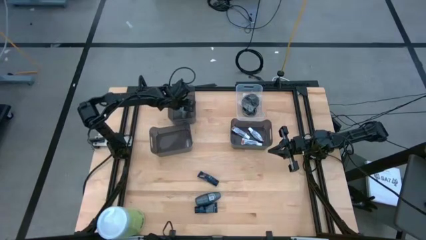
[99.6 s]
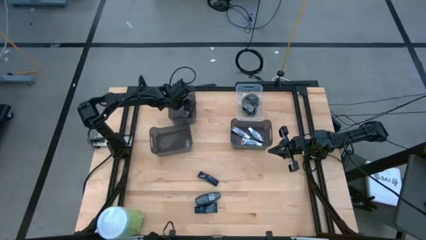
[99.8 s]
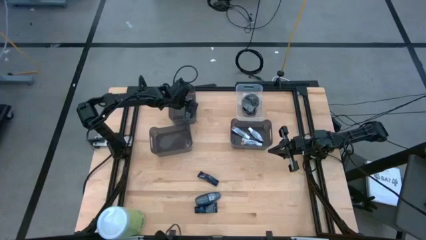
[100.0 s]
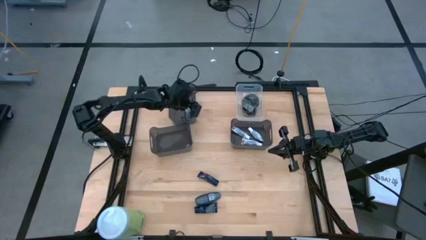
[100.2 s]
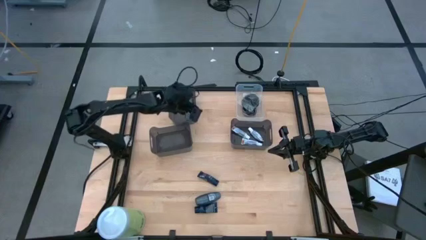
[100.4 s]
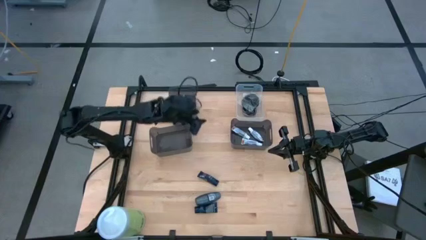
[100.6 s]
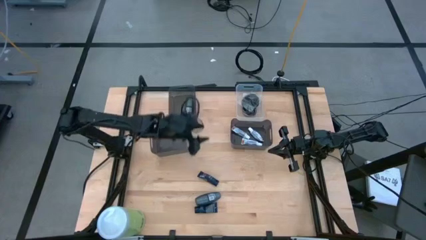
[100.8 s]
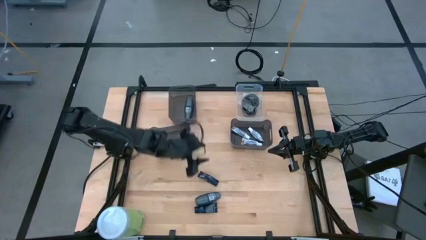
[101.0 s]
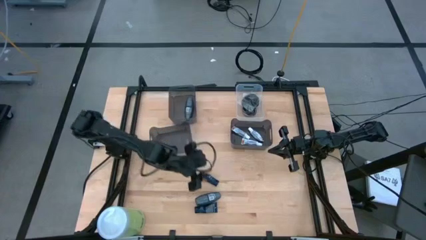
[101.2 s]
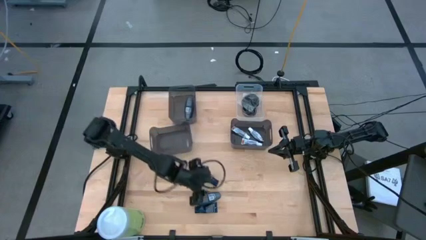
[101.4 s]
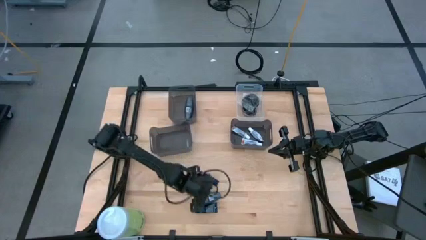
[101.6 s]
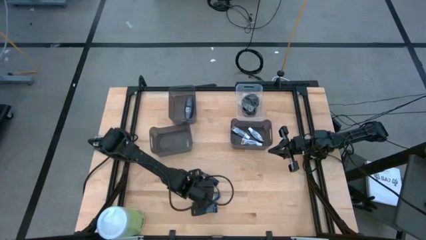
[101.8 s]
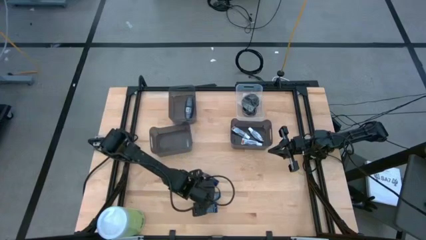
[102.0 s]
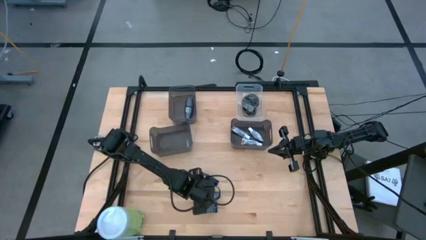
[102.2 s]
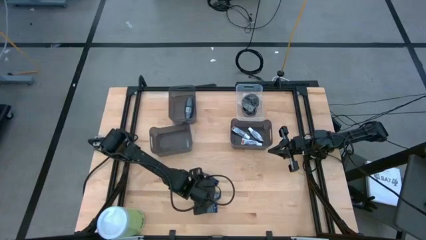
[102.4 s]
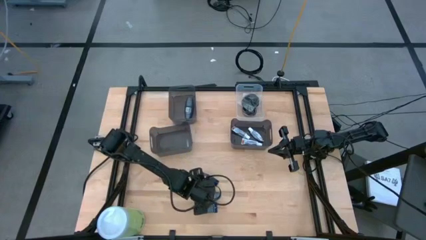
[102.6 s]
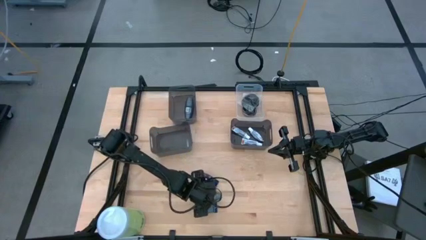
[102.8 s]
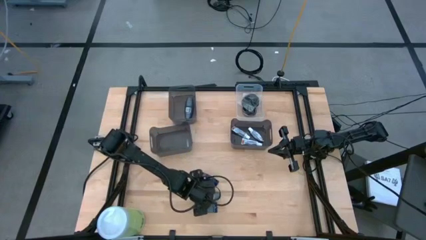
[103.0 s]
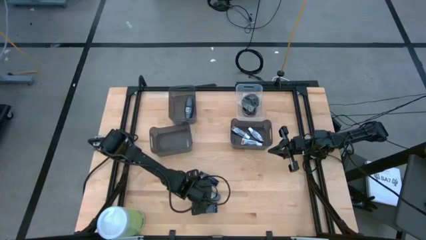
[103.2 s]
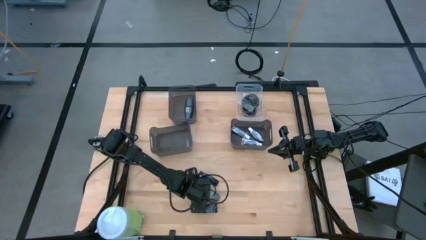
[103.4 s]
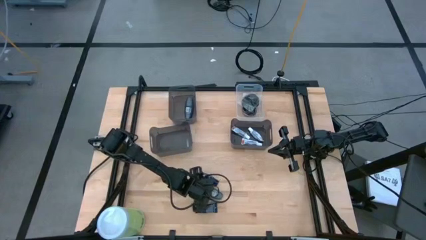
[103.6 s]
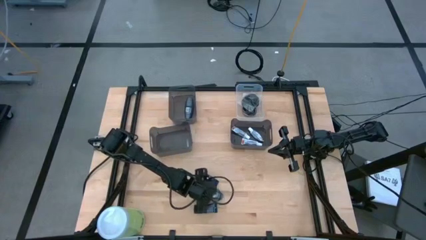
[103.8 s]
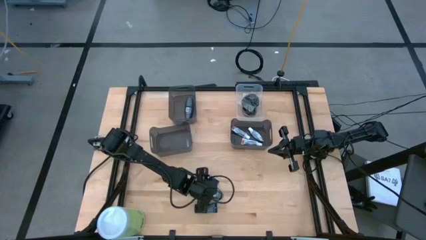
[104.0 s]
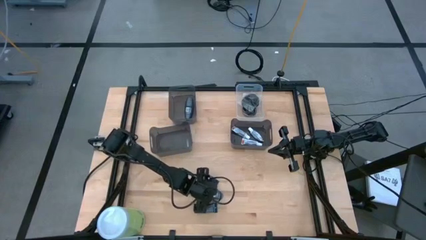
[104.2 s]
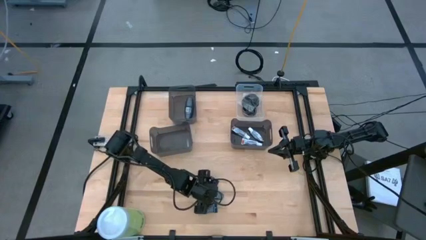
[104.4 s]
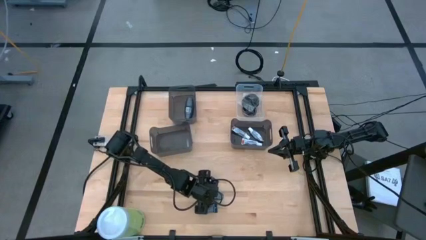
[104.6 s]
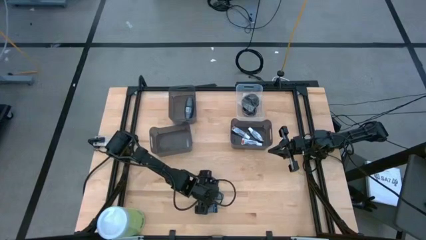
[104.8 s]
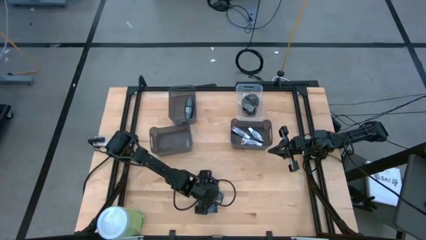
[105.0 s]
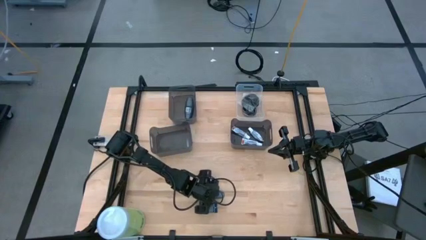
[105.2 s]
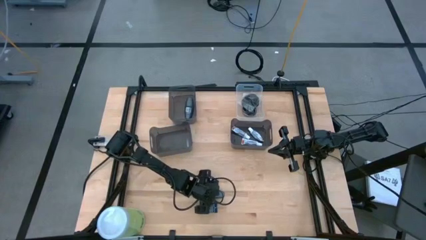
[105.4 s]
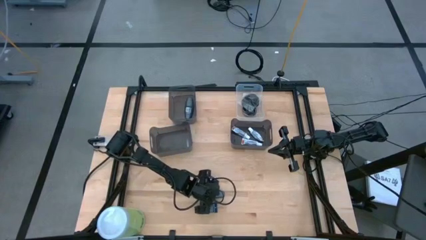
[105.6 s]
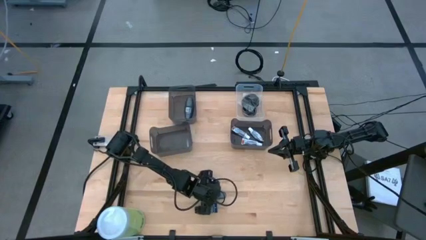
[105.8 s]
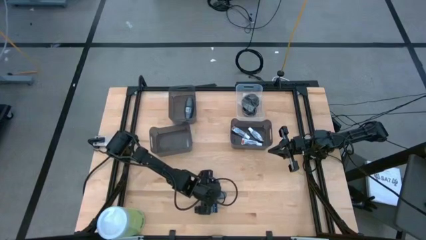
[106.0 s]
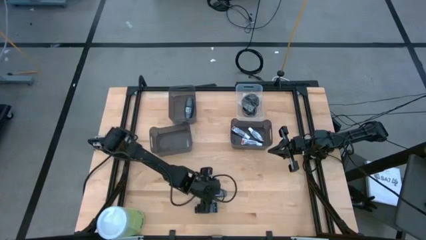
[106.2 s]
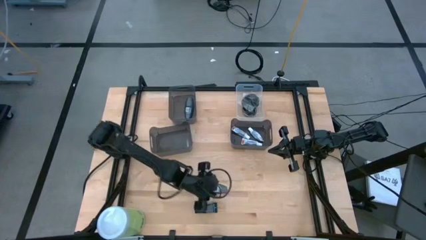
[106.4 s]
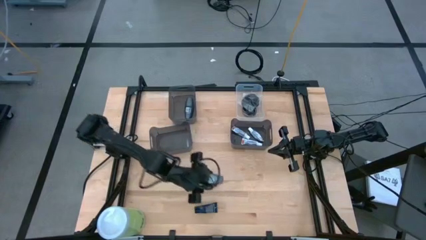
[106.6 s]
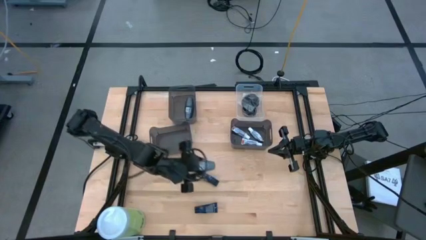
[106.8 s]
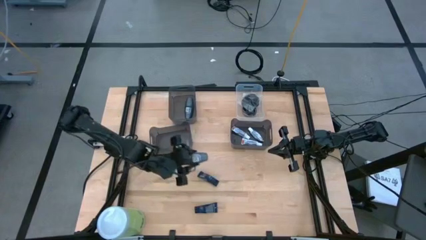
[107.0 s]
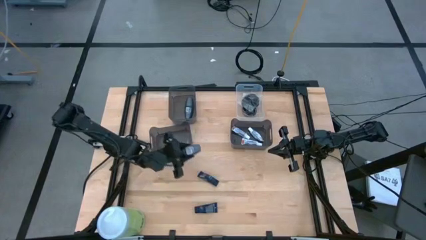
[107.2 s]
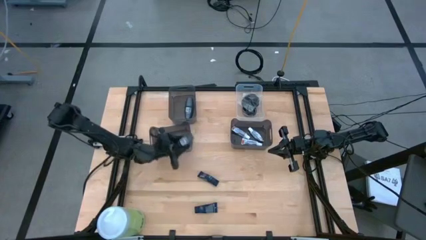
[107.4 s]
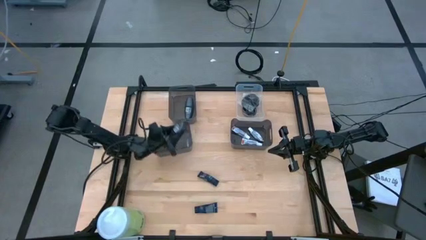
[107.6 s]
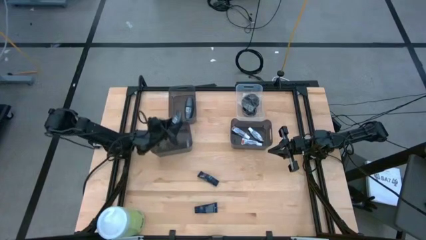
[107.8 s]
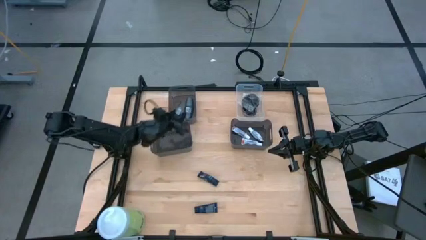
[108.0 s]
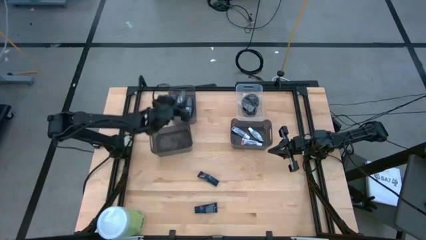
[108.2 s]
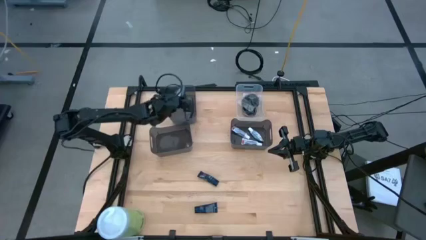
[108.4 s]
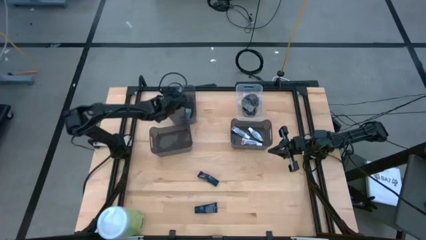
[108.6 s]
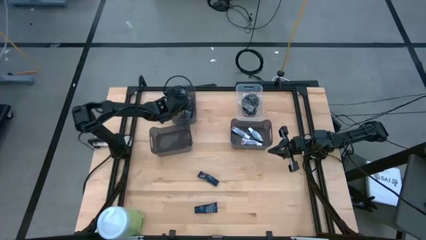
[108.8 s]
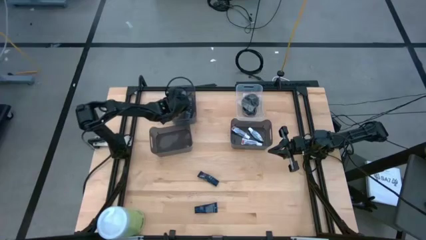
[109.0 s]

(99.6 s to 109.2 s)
Task: Pick & Place Travel size toiletries
Put the gray deodorant into the top black bin

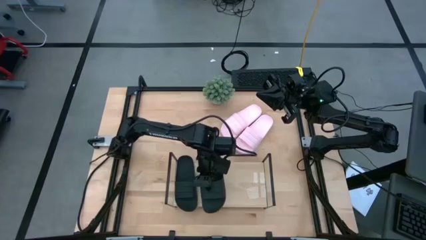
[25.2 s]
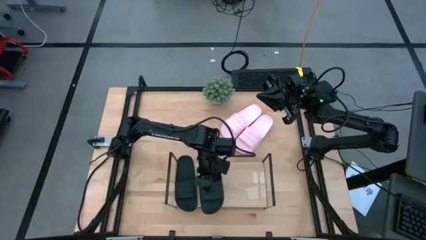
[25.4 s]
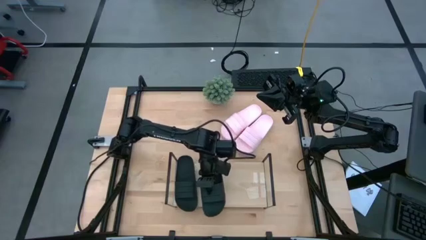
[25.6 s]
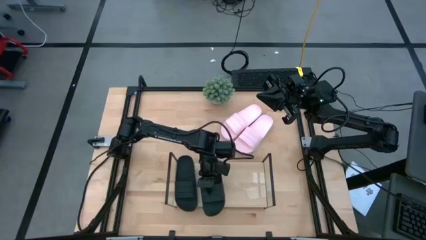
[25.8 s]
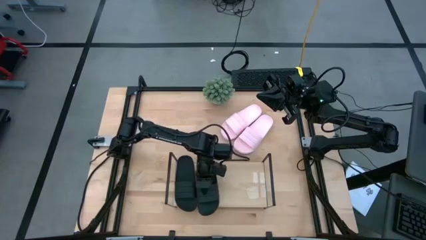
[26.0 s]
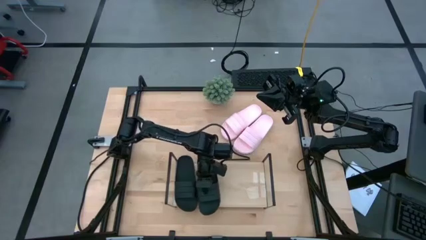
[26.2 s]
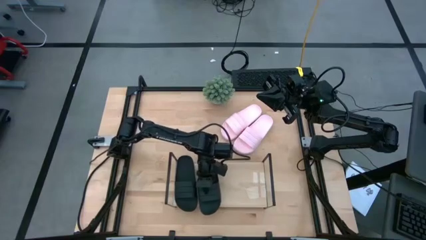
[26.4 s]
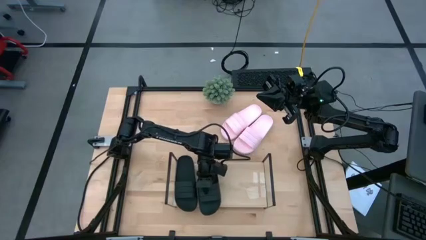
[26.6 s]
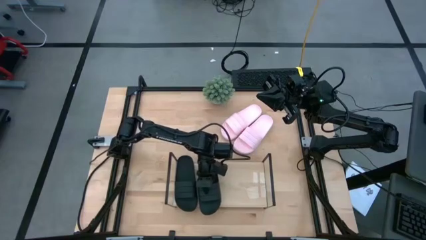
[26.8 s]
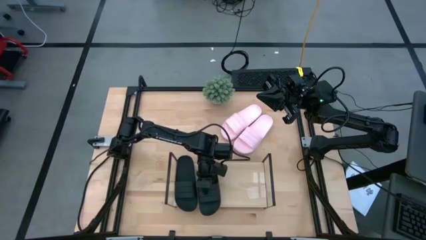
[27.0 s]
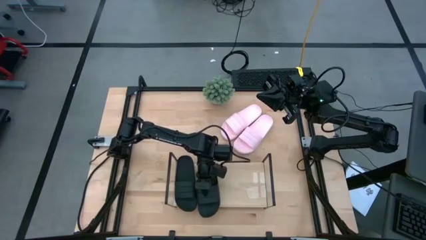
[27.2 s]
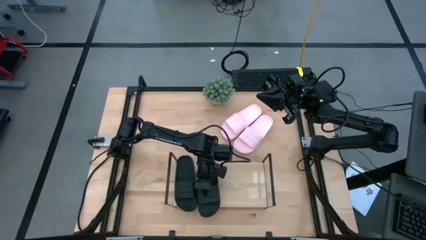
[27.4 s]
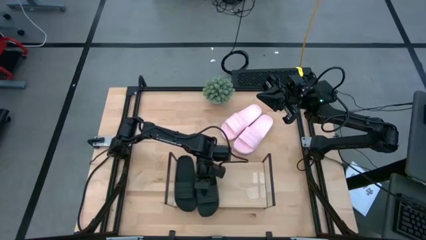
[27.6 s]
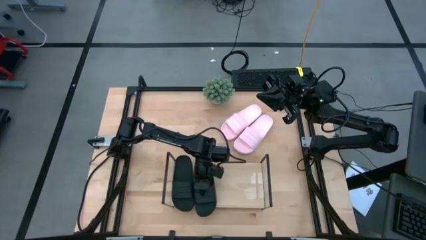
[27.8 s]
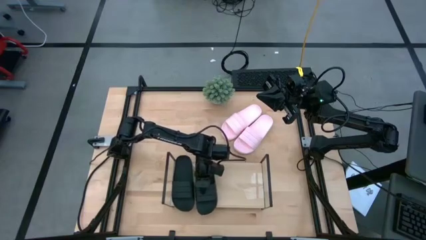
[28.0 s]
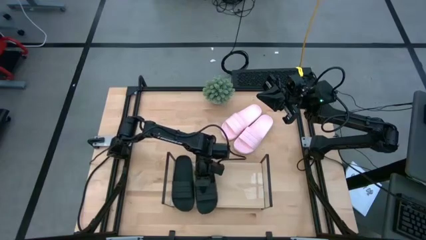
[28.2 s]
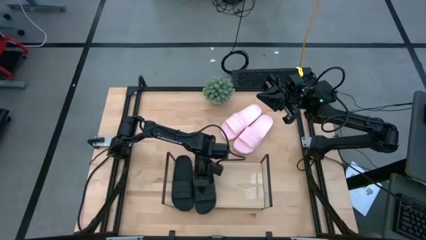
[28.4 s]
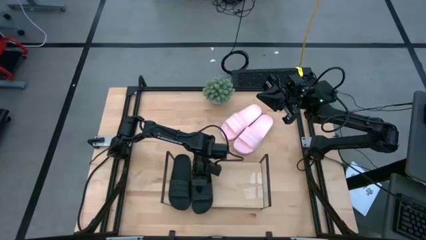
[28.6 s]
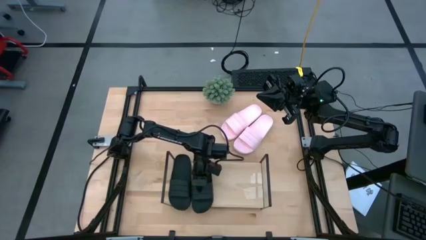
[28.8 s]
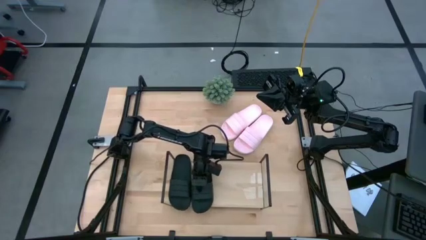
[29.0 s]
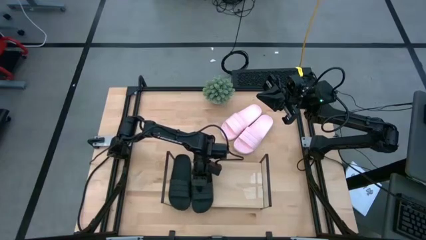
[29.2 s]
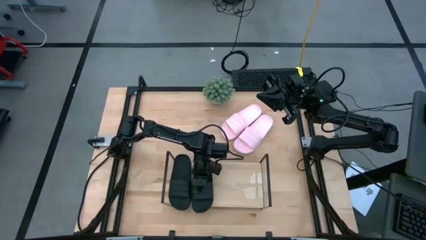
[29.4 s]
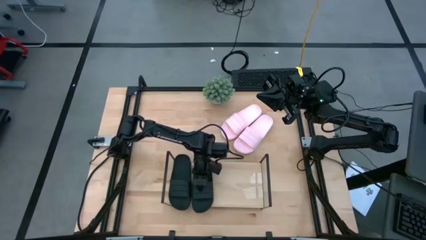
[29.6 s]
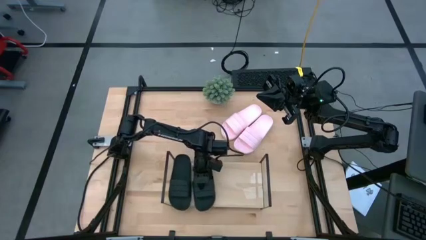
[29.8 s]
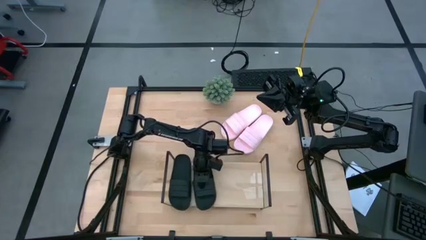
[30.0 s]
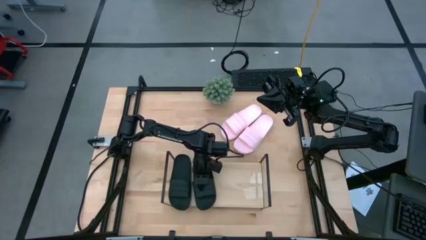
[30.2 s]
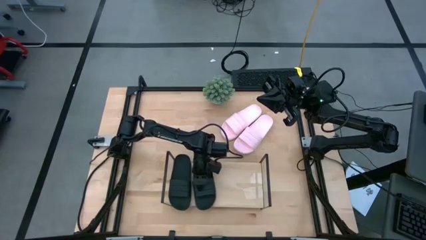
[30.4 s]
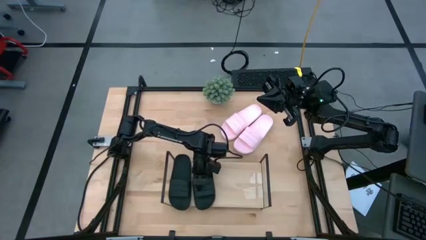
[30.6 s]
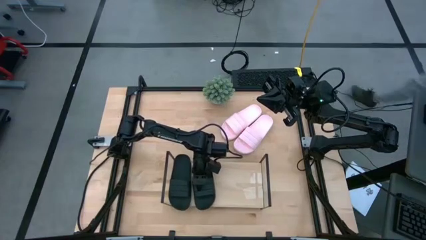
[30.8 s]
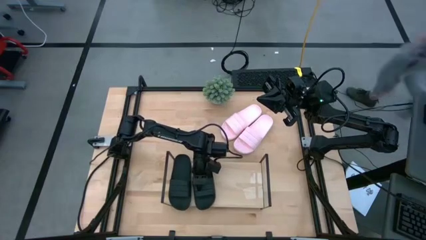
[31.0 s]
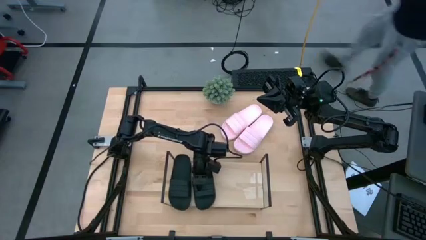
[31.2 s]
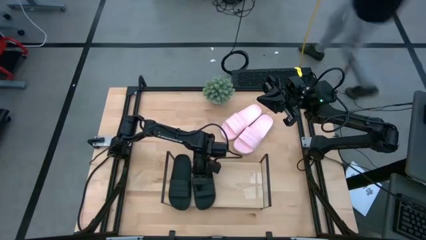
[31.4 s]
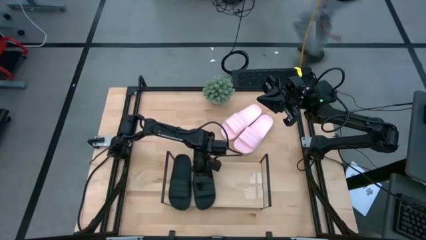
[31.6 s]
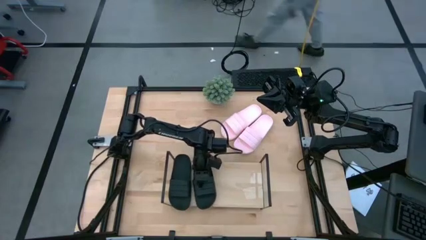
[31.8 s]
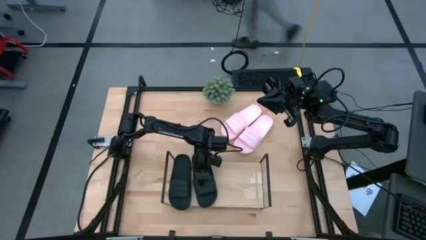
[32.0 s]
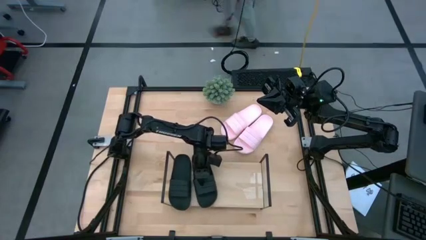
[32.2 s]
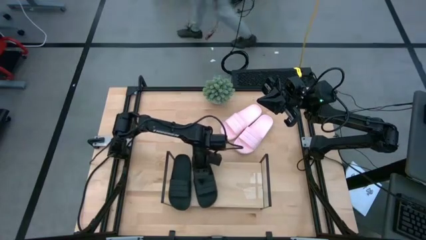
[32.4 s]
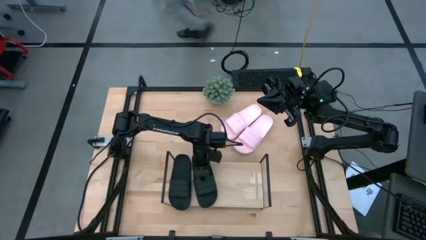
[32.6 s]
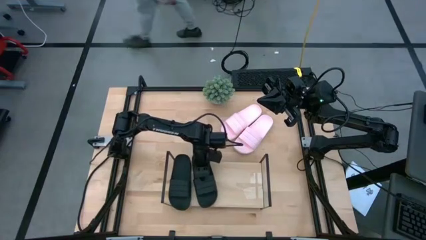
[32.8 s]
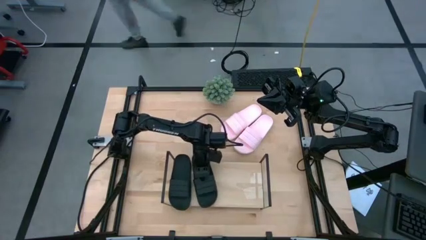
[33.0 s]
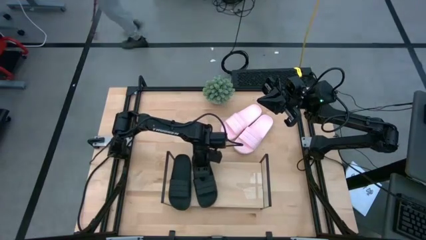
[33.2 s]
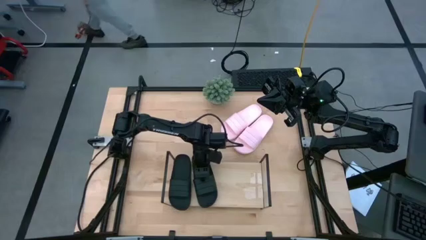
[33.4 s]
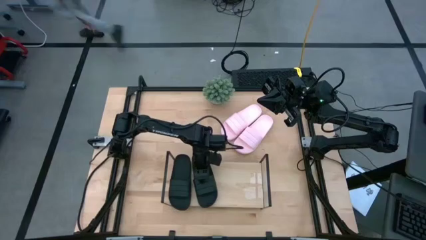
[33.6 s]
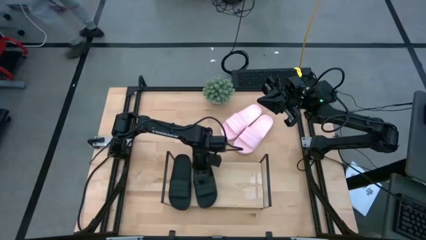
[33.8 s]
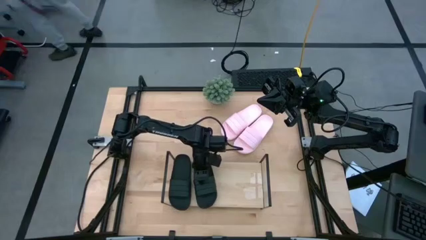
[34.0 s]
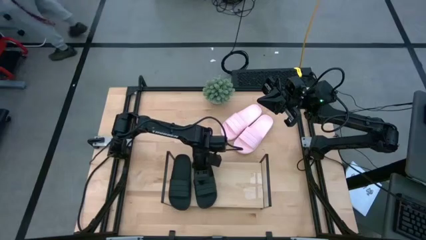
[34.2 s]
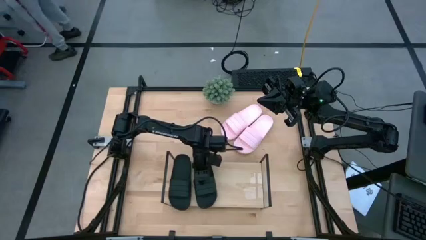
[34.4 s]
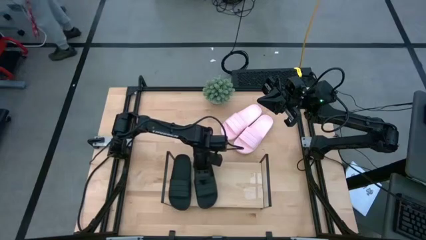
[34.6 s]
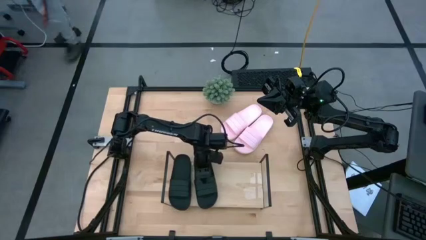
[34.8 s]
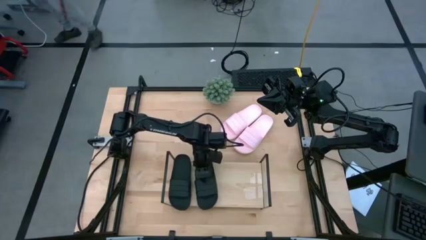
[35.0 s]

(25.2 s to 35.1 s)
Task: Pick and place slides into the shelf
Put the right black slipper on the shelf
